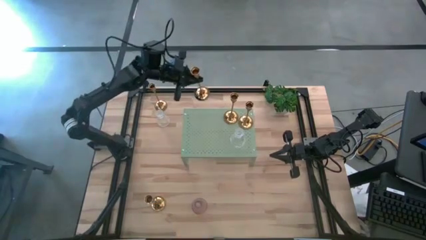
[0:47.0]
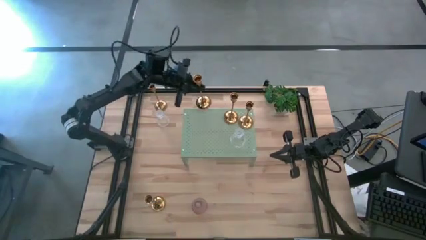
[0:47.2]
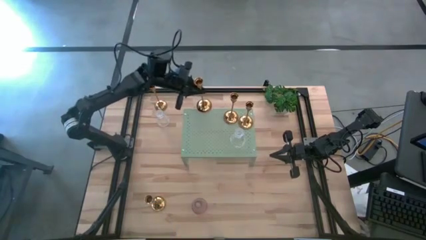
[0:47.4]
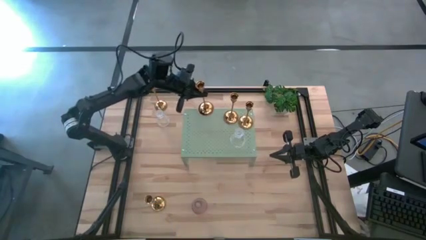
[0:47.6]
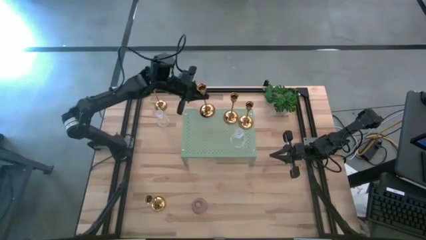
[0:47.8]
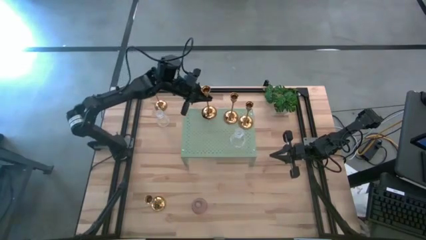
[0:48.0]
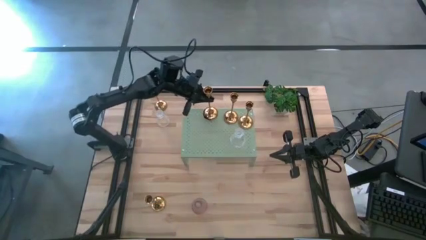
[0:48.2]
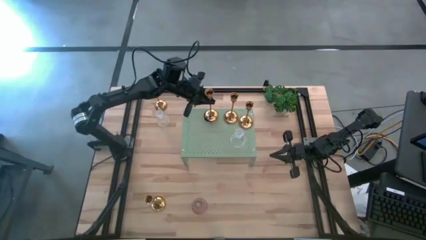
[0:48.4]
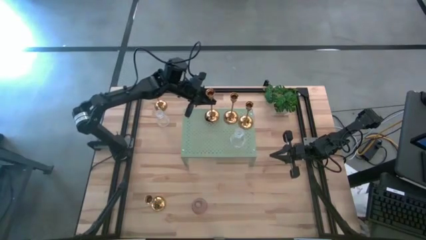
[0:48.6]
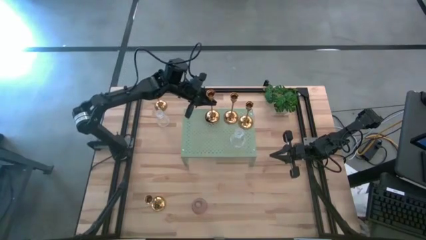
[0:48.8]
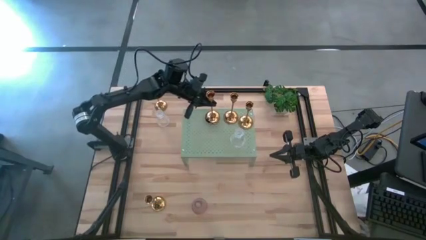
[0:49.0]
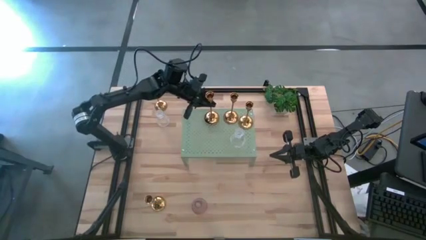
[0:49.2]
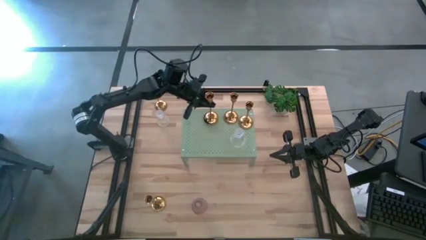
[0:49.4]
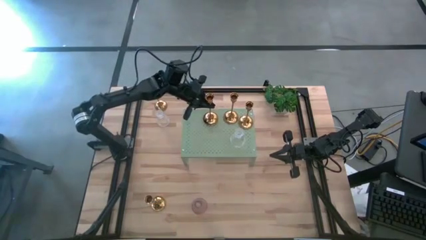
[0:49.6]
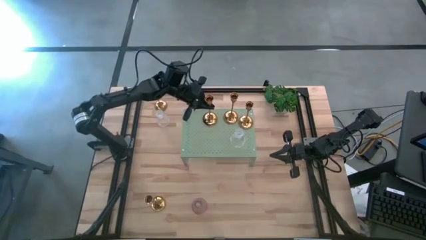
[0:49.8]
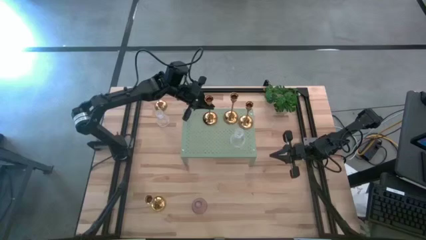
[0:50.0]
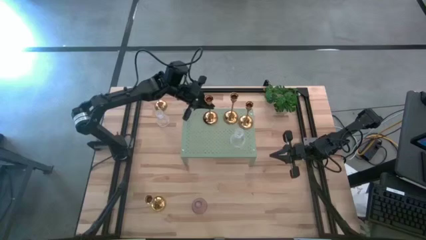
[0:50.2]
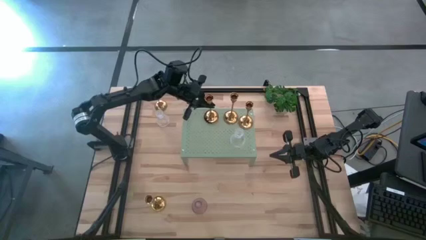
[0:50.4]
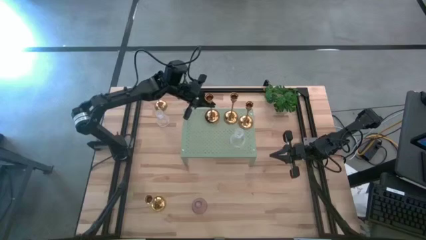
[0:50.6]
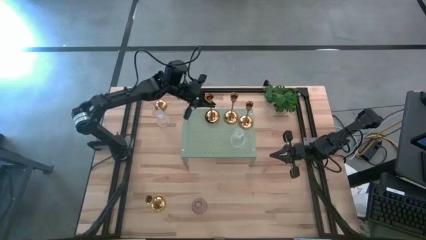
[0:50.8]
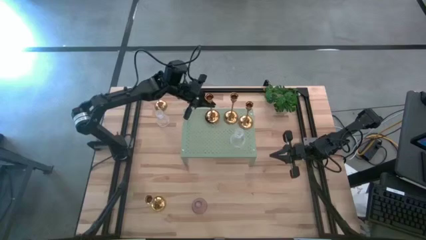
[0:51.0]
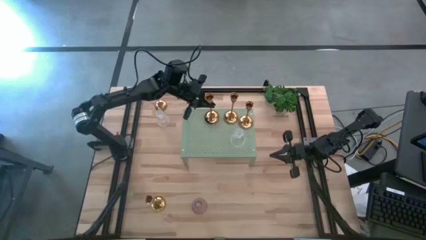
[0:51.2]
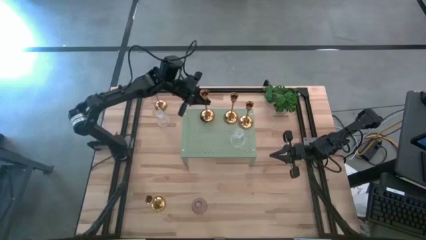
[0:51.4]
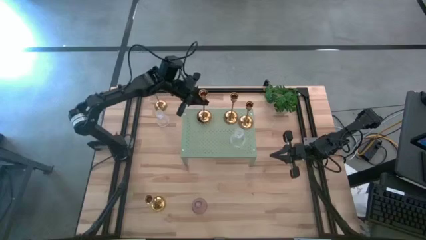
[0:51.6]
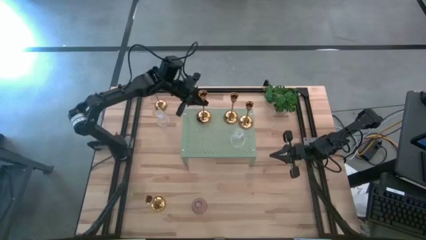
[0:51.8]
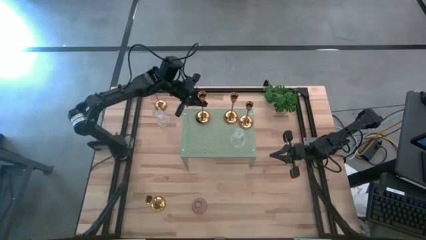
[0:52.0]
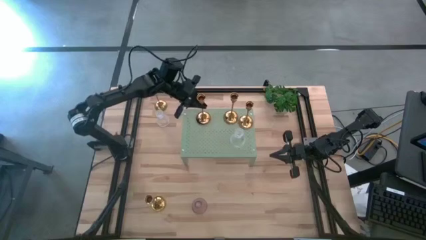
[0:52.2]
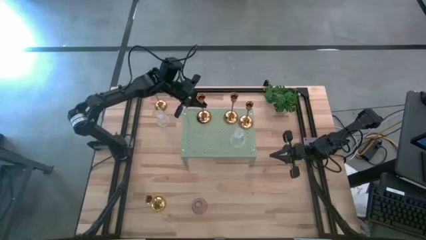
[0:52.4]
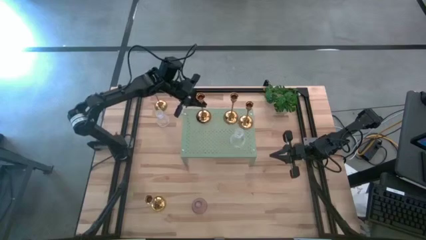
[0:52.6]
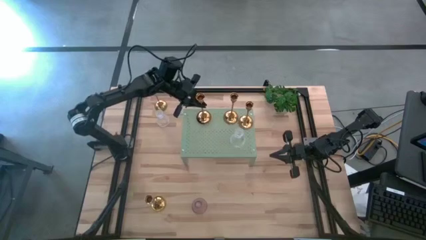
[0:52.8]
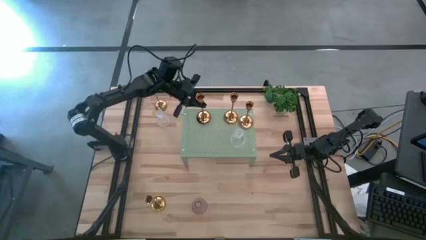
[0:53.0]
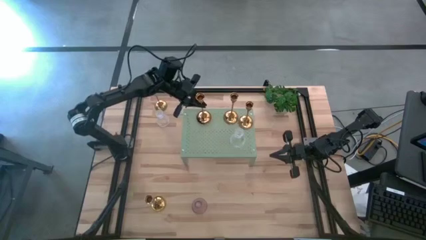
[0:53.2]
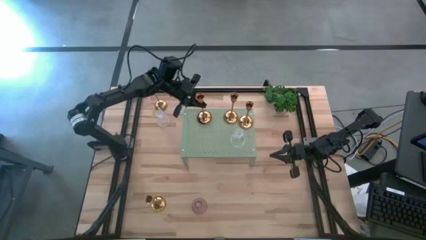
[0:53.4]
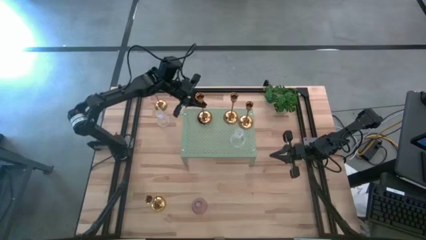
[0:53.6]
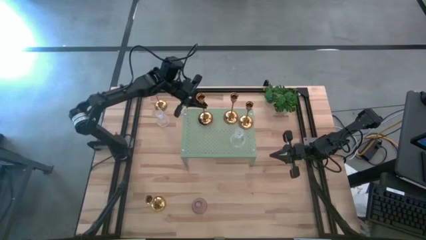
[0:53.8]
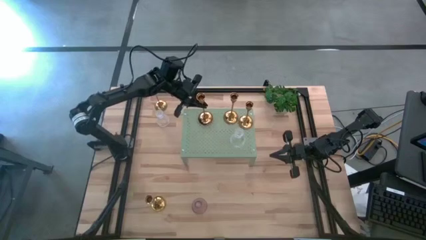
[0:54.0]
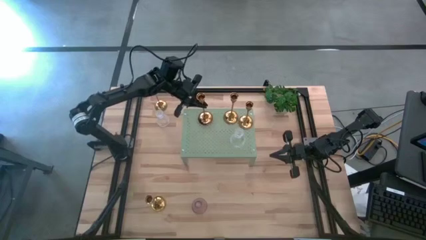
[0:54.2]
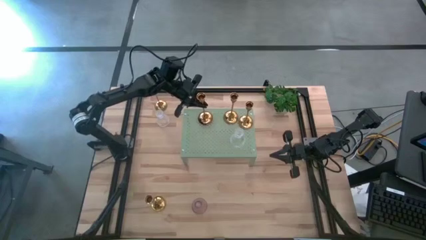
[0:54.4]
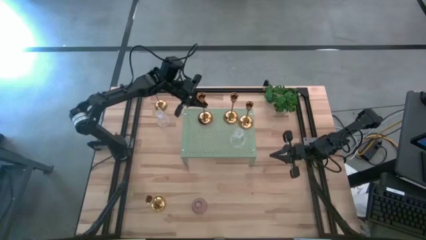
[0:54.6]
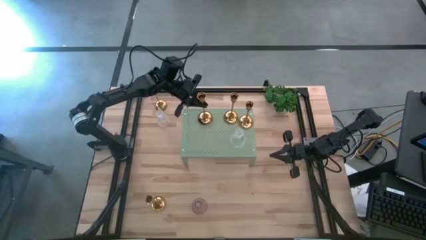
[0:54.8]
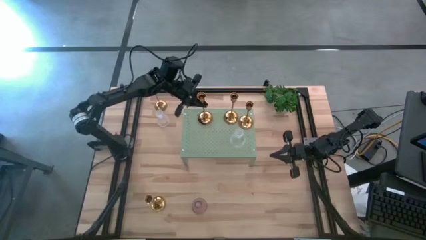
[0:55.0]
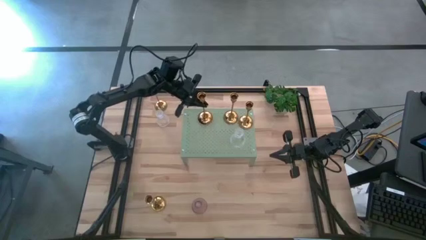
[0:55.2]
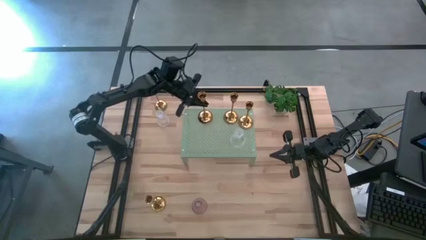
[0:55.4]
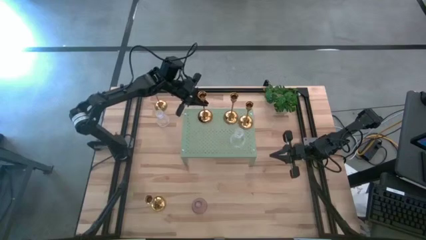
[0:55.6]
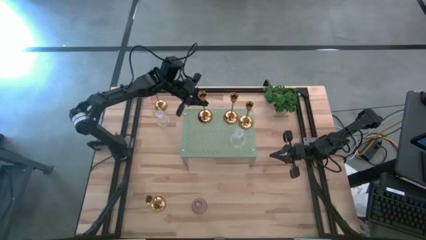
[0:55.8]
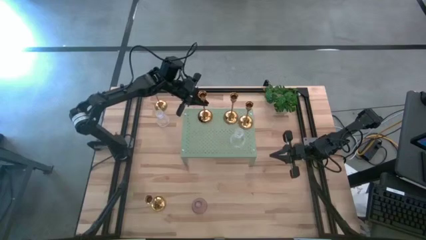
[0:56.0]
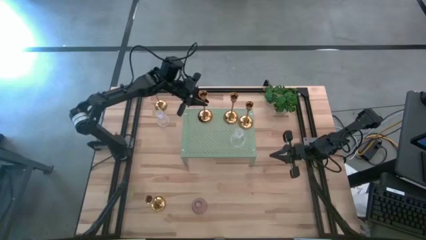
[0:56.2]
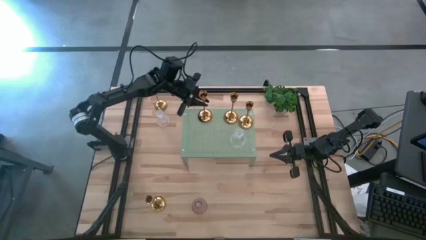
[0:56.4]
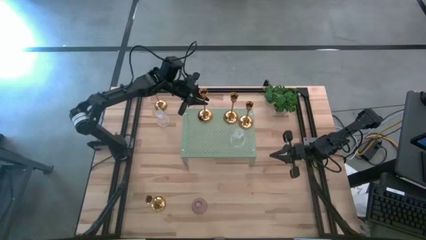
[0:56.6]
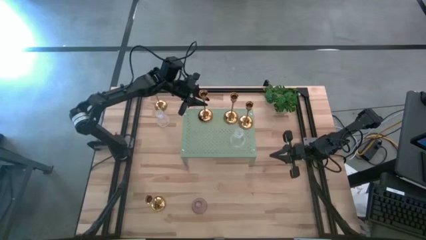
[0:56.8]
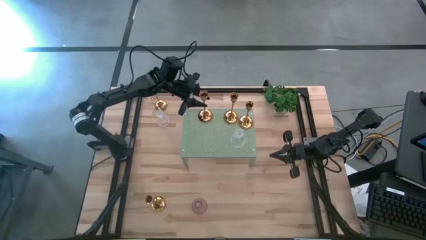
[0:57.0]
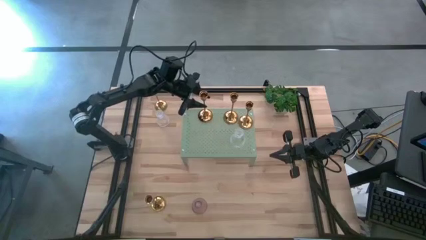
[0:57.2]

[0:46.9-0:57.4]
Task: Pick & Place candle stick holders
Put the gold candle stand on the shelf
